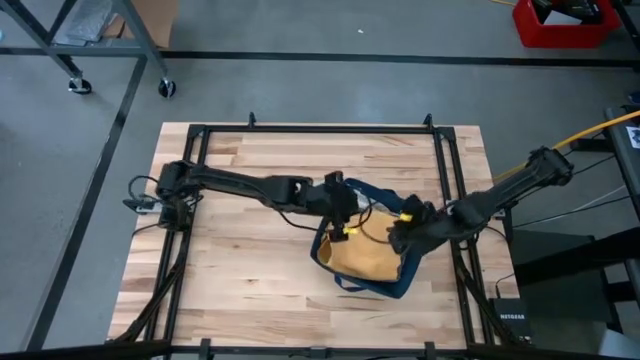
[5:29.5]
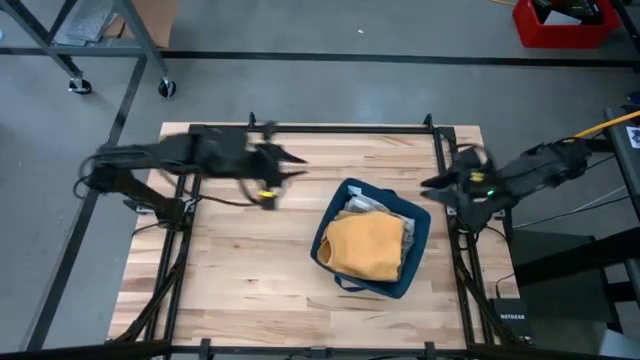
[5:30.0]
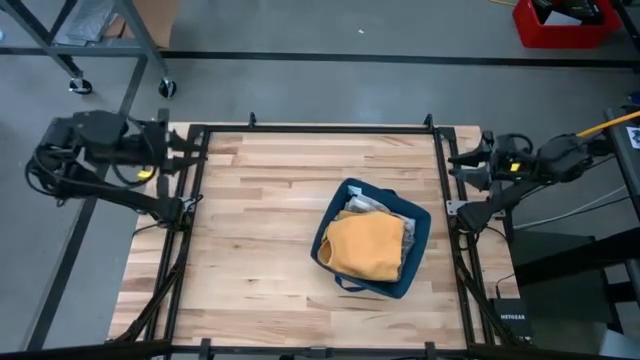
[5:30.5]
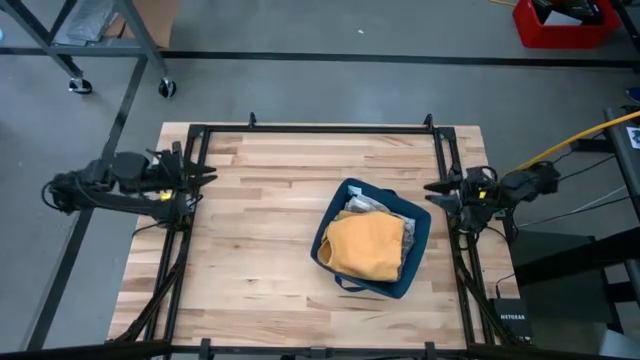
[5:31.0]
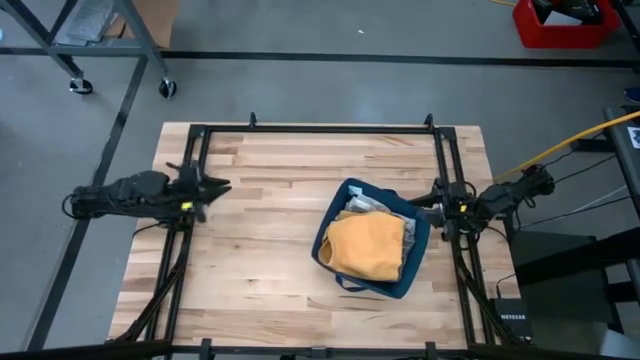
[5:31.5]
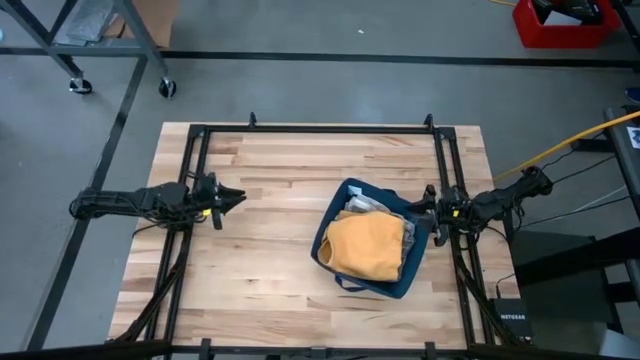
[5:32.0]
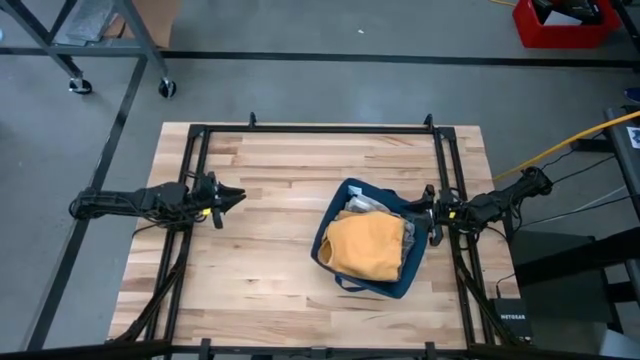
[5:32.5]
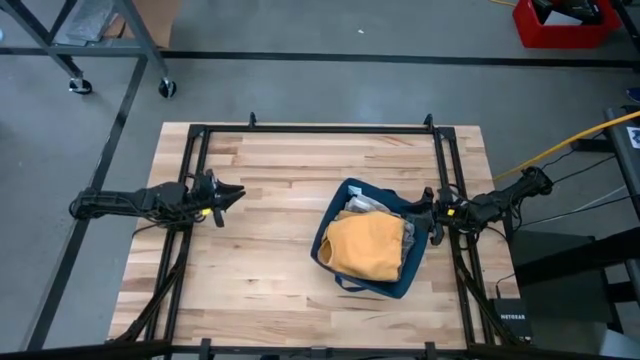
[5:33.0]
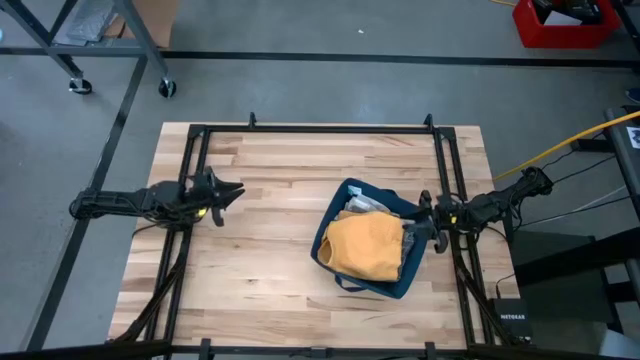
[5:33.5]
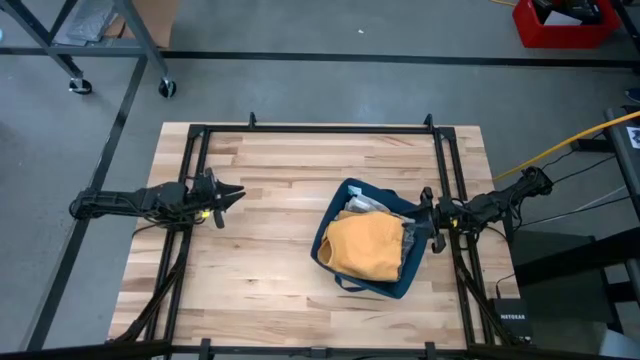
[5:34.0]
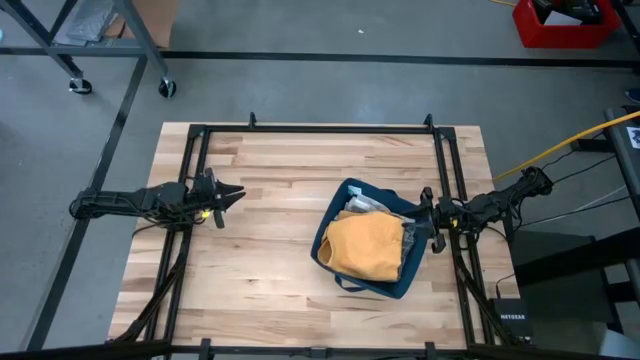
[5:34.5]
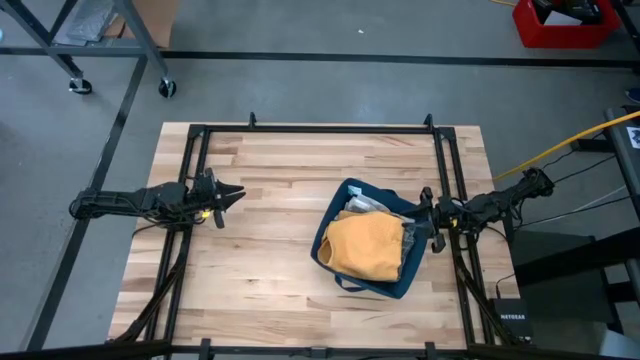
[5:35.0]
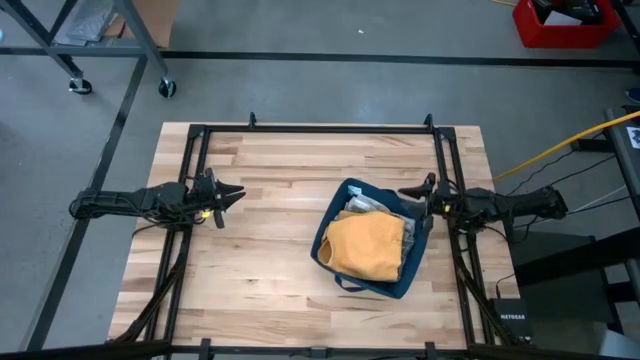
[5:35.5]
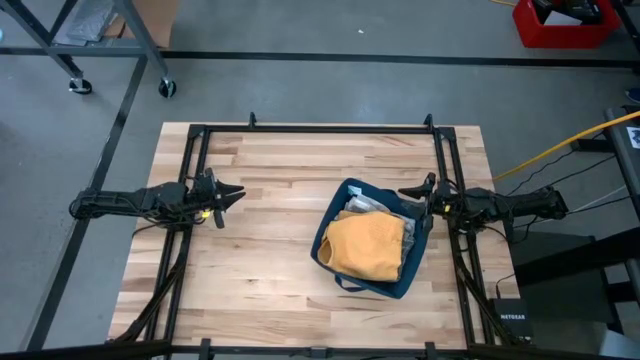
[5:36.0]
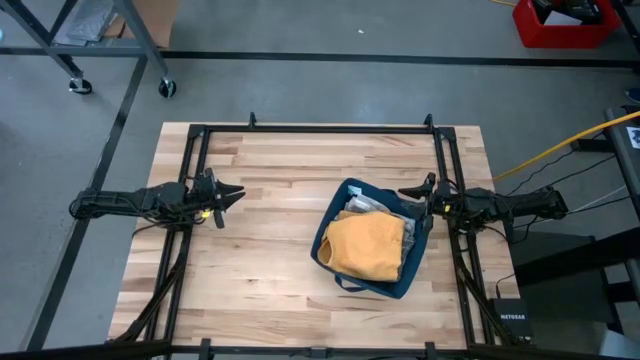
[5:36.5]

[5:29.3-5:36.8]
Task: Fold towel
Return to Home Position

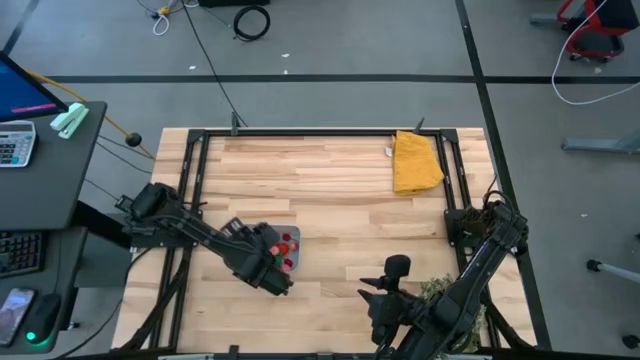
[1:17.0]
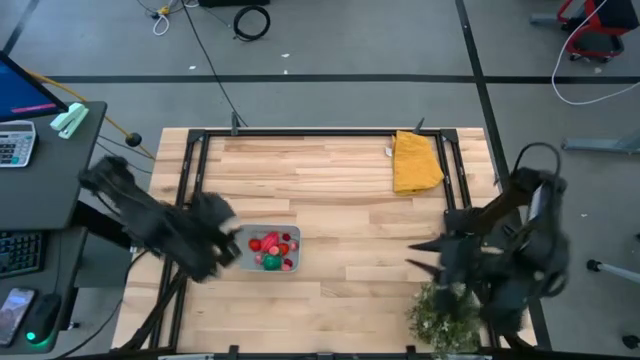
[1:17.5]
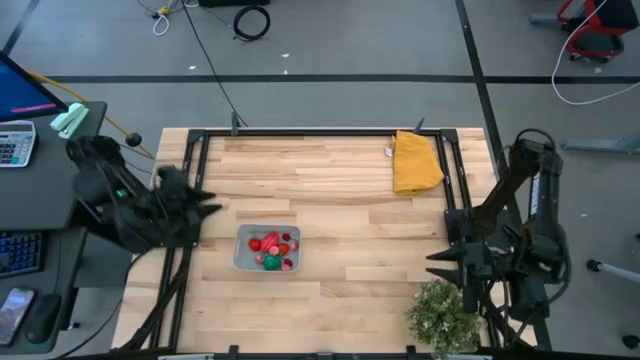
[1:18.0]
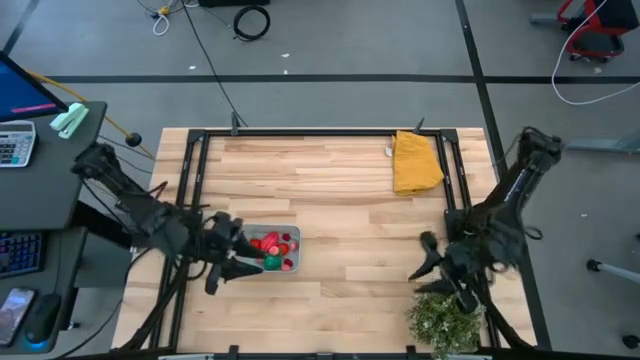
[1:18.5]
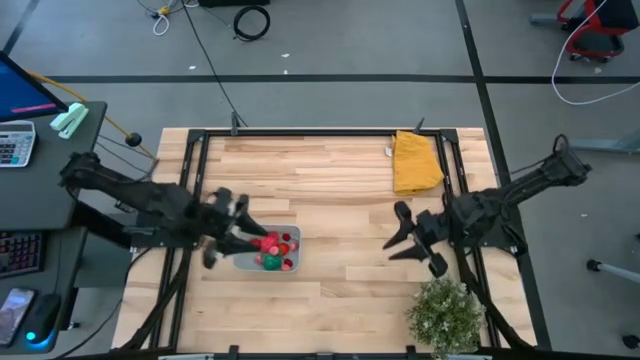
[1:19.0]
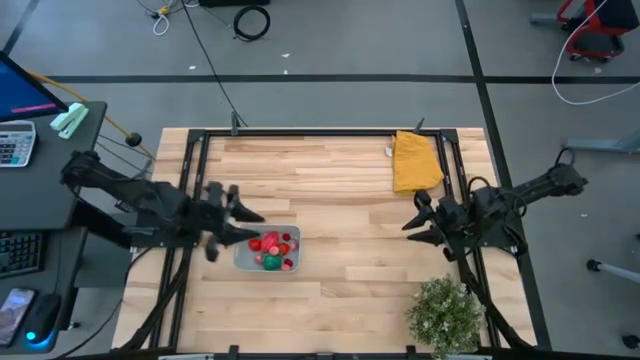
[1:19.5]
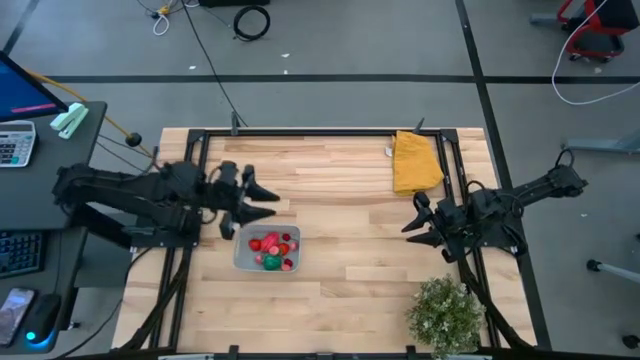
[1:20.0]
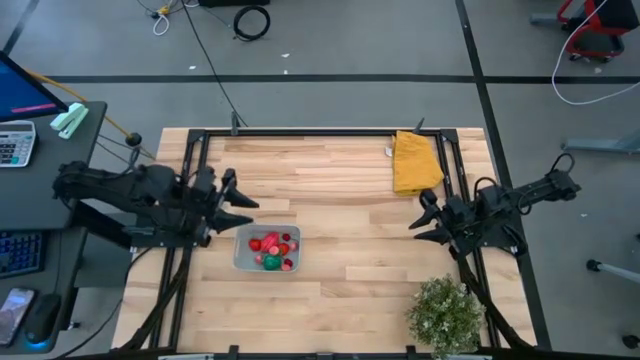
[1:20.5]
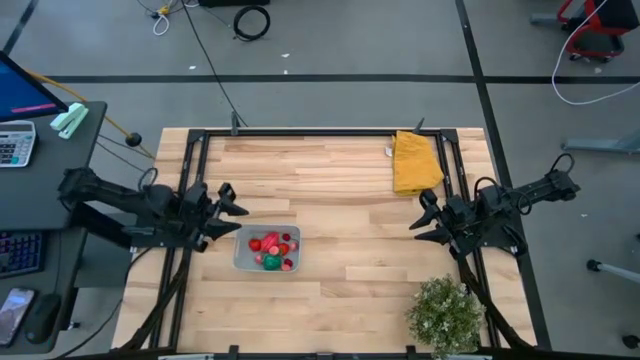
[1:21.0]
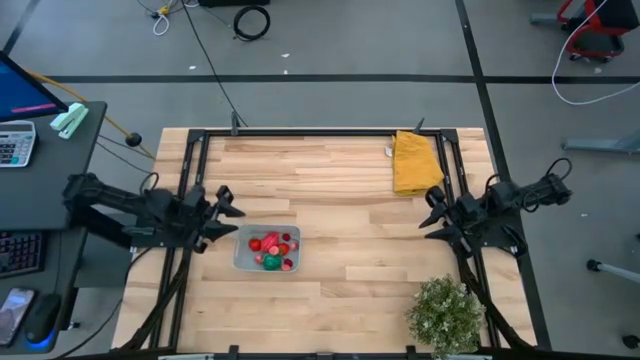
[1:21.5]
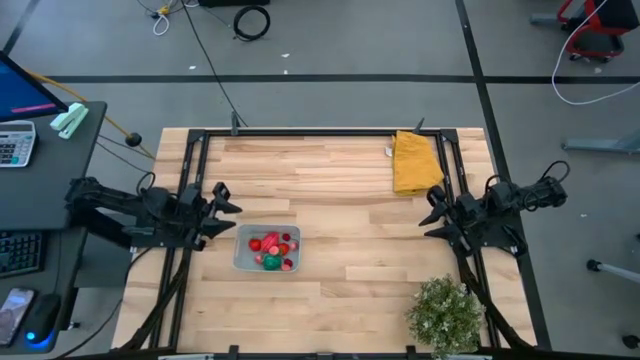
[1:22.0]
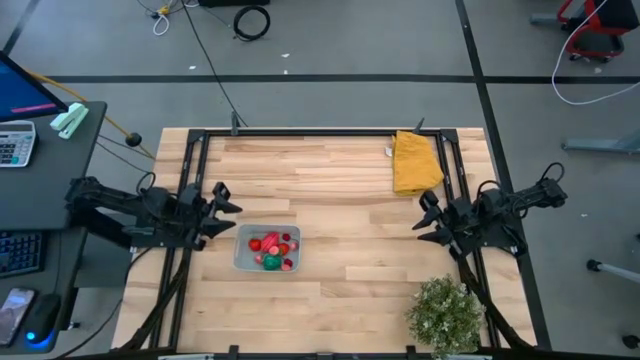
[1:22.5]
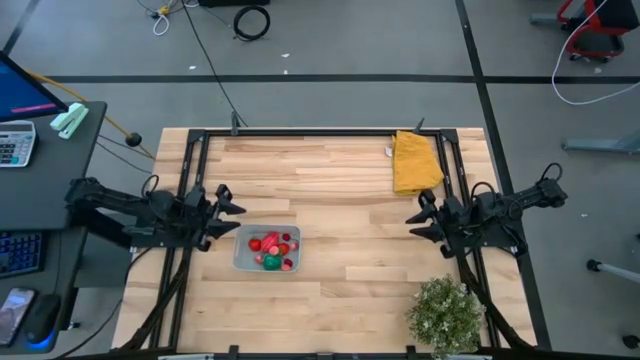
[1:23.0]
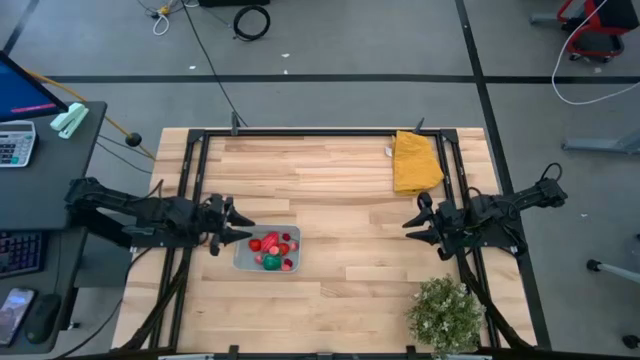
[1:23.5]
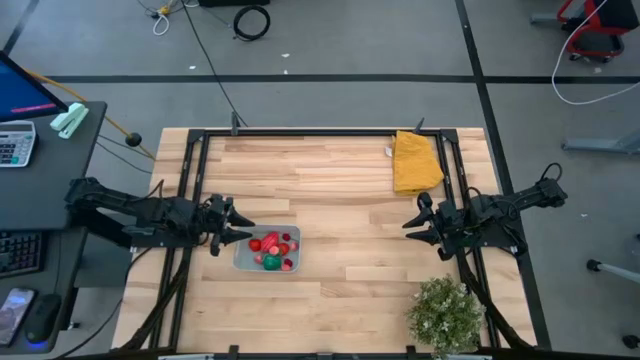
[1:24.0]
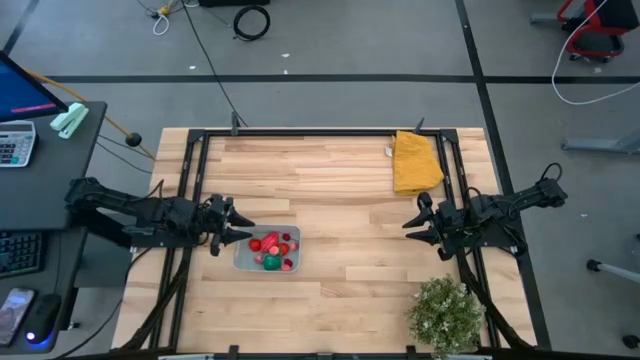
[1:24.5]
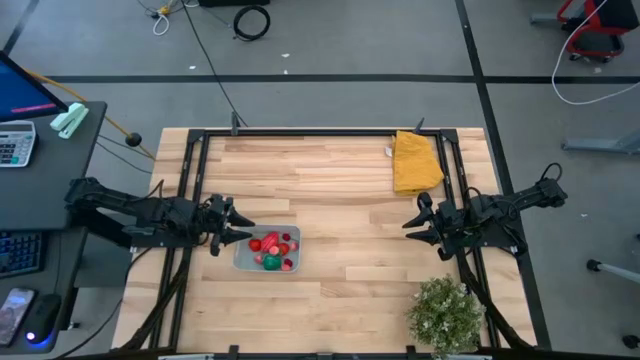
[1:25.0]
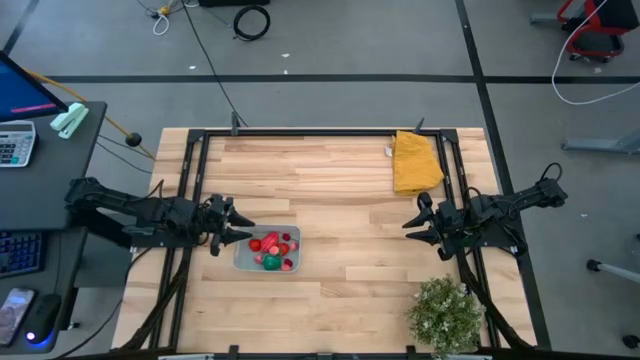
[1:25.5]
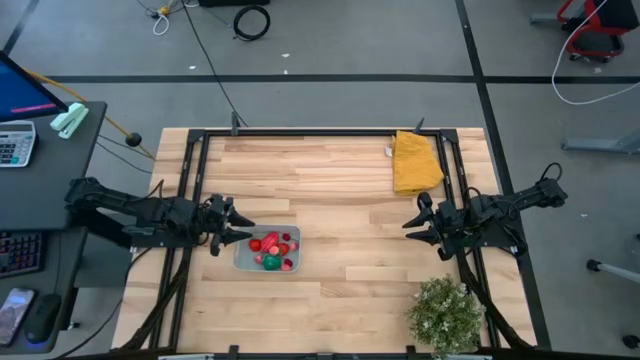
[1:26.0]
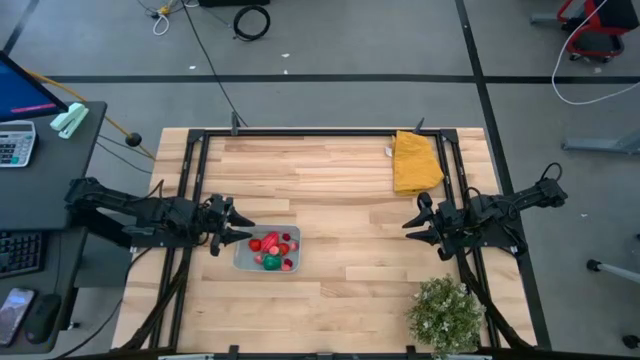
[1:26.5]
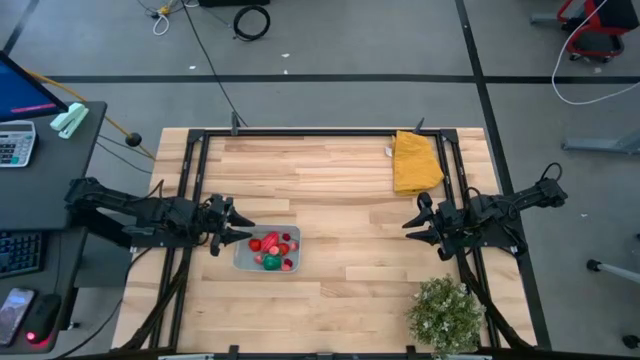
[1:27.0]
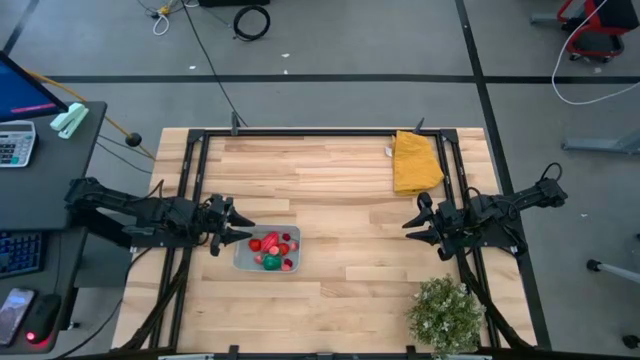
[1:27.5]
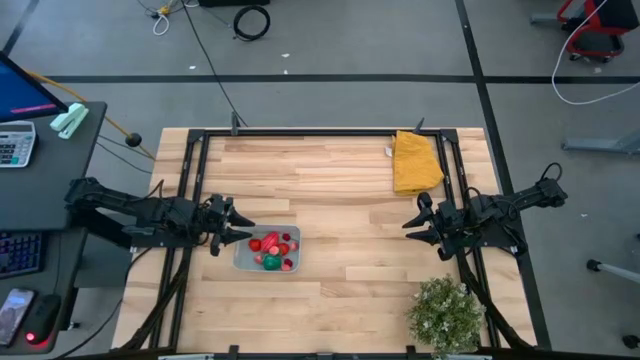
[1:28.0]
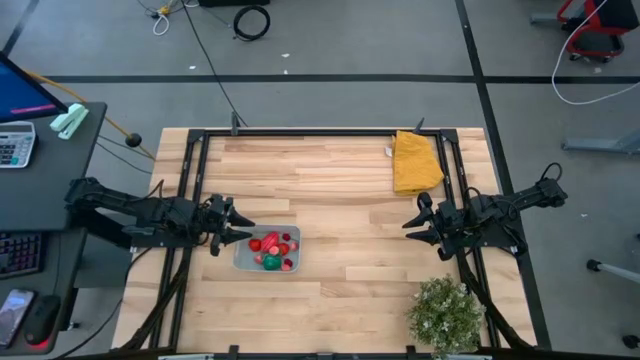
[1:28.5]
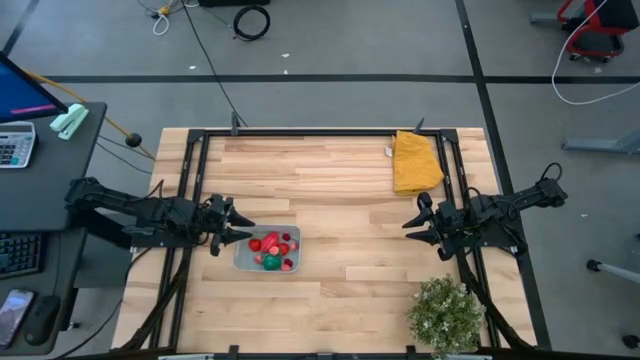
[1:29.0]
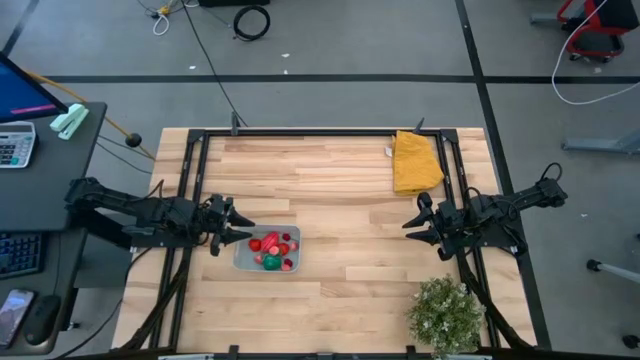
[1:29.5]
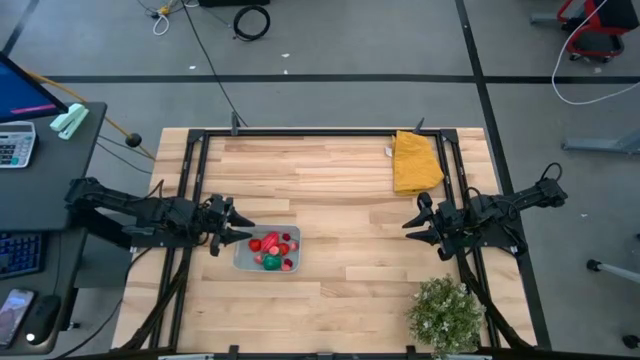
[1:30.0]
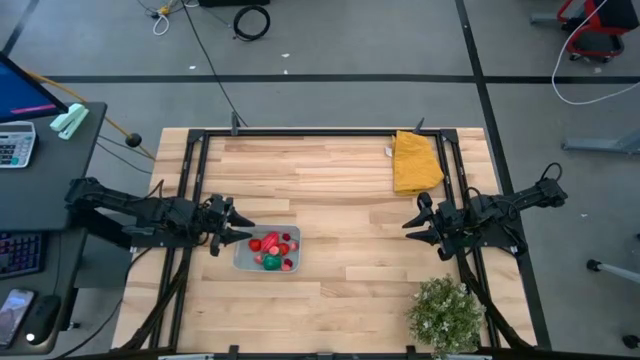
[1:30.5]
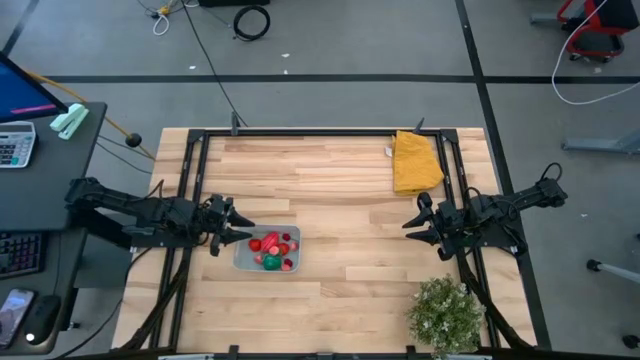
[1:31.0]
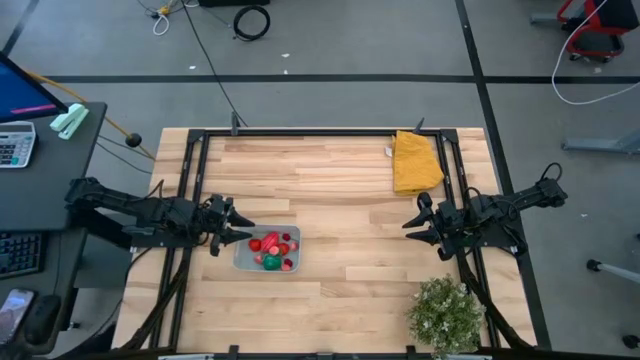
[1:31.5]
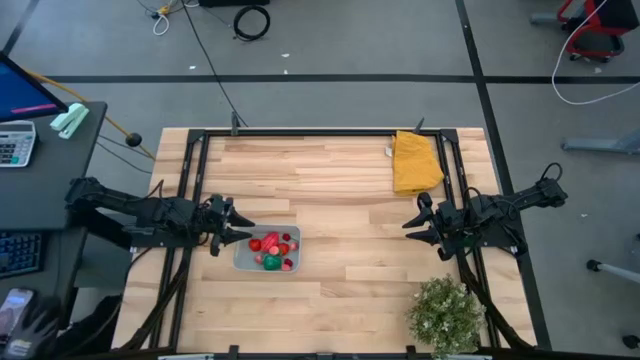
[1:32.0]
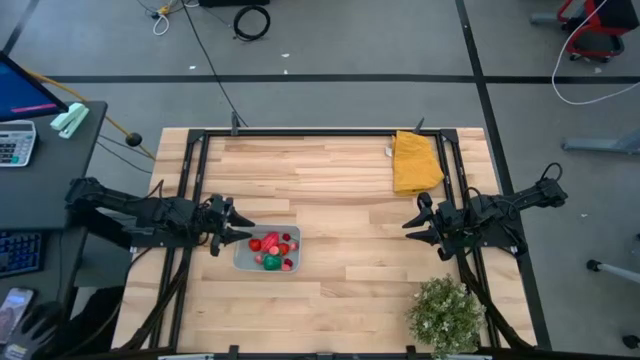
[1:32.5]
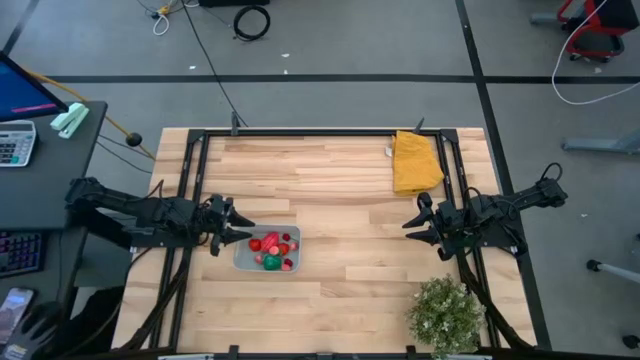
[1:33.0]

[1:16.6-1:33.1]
Task: Pick and placing Produce into tupperware
Return to Home Position
